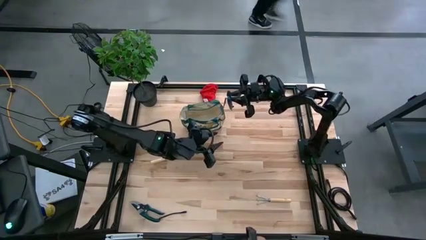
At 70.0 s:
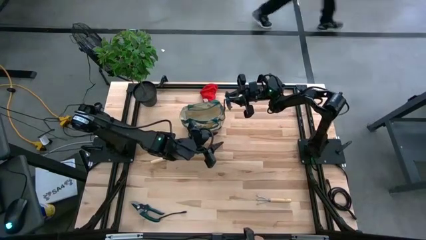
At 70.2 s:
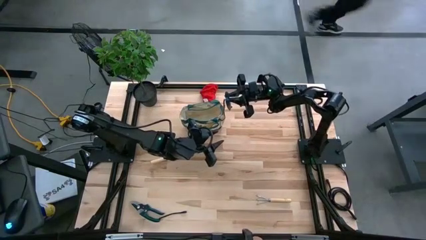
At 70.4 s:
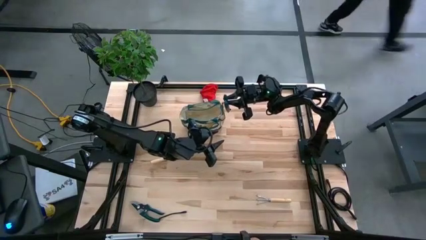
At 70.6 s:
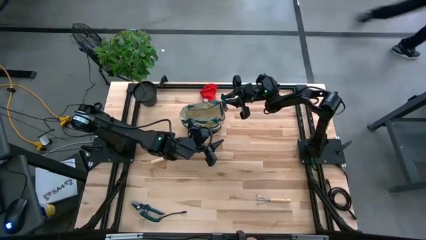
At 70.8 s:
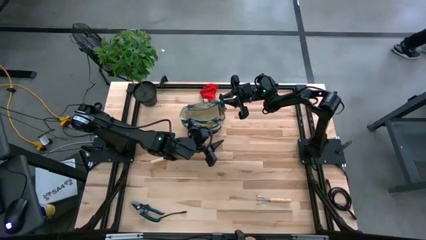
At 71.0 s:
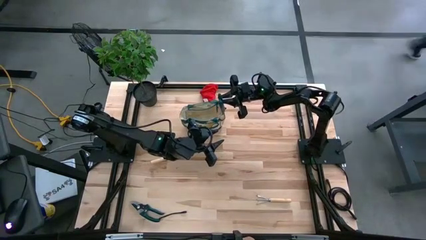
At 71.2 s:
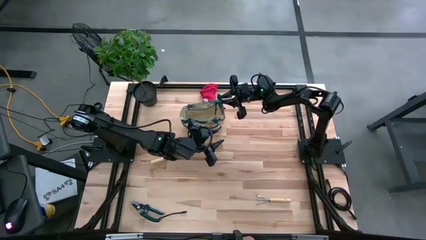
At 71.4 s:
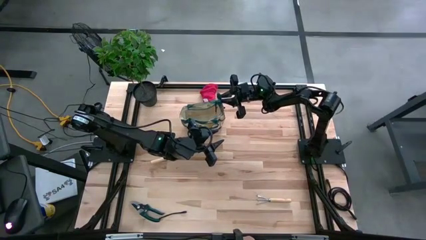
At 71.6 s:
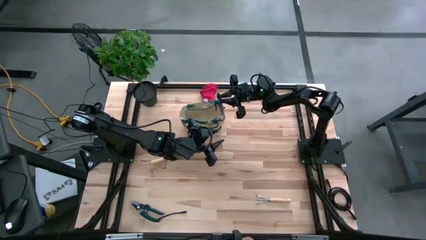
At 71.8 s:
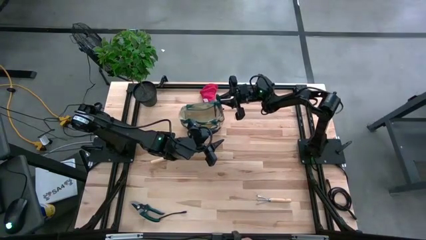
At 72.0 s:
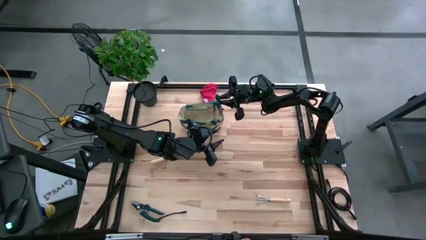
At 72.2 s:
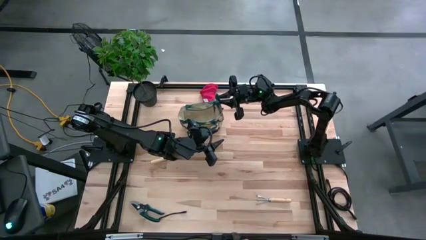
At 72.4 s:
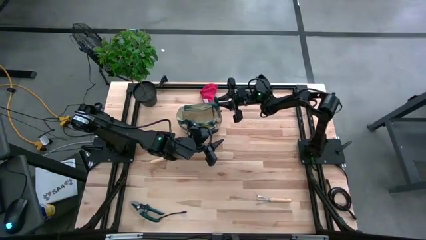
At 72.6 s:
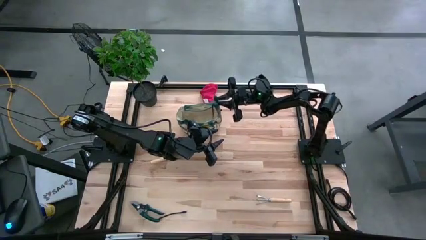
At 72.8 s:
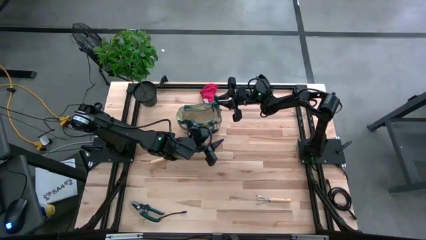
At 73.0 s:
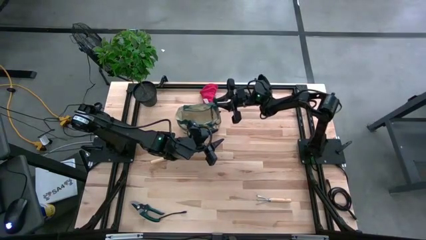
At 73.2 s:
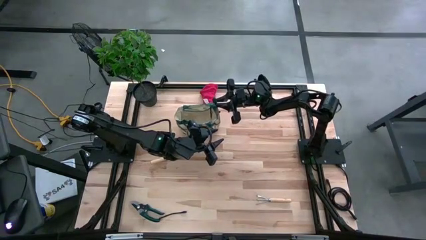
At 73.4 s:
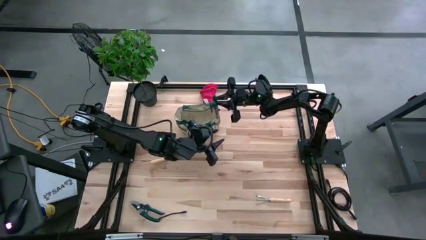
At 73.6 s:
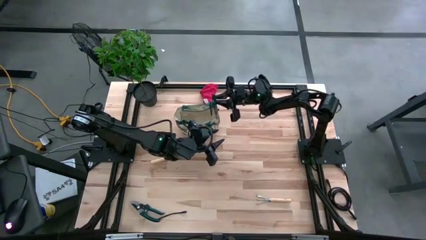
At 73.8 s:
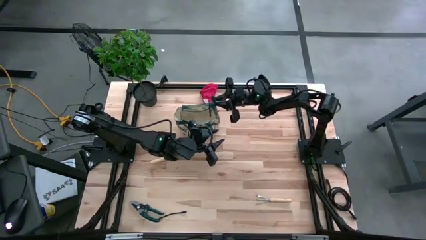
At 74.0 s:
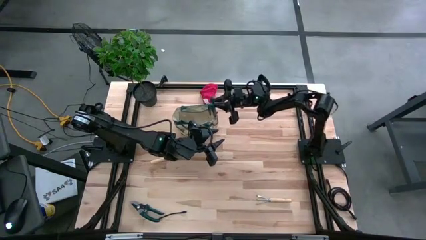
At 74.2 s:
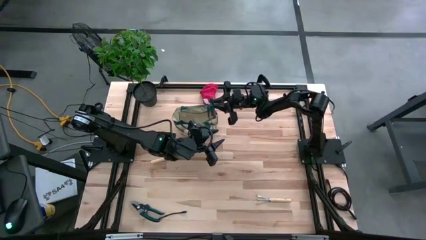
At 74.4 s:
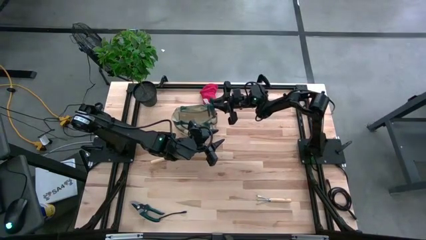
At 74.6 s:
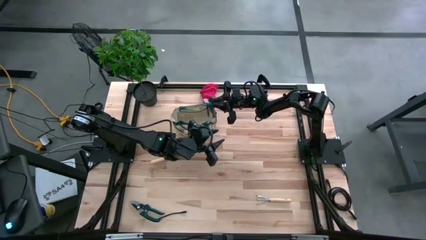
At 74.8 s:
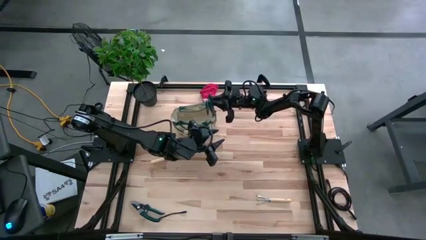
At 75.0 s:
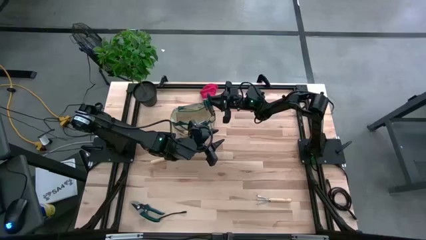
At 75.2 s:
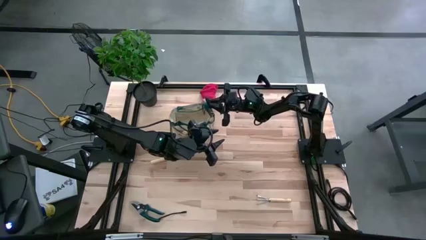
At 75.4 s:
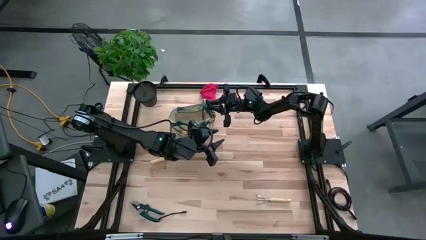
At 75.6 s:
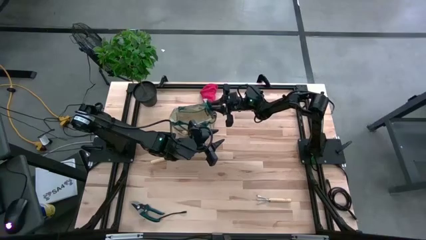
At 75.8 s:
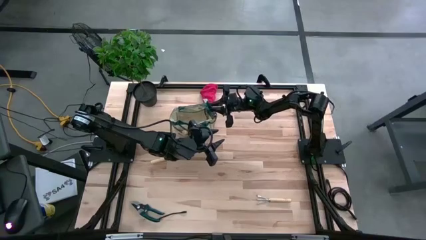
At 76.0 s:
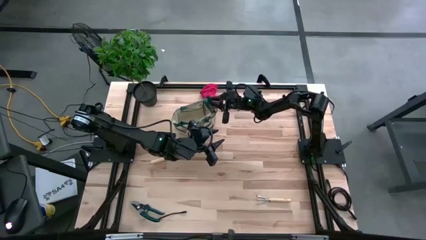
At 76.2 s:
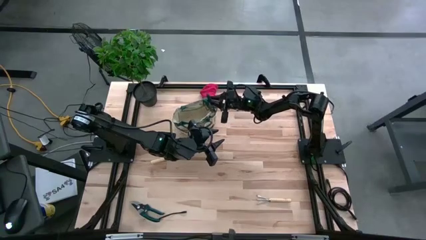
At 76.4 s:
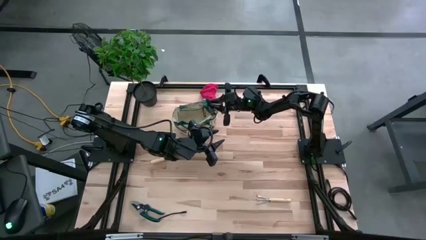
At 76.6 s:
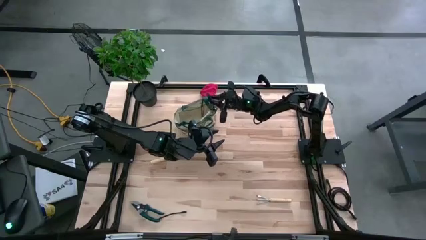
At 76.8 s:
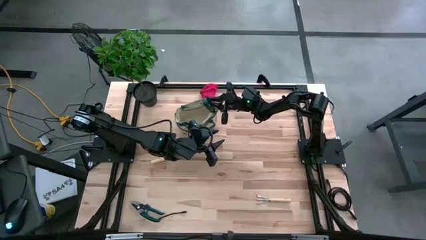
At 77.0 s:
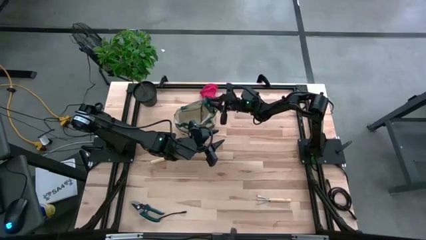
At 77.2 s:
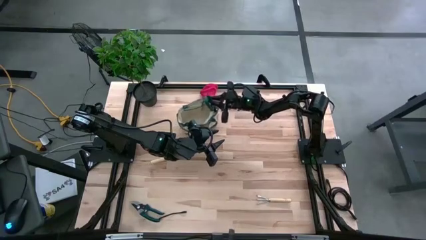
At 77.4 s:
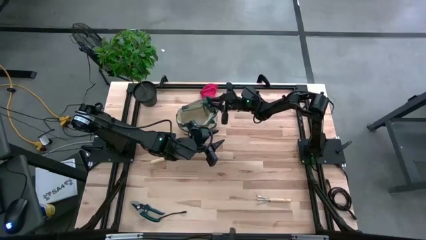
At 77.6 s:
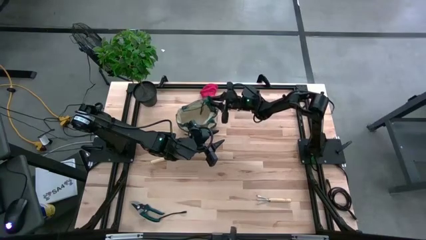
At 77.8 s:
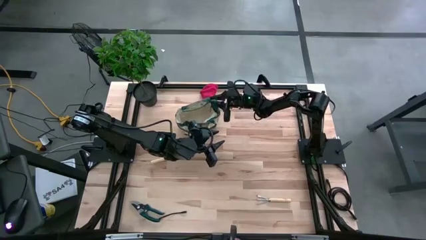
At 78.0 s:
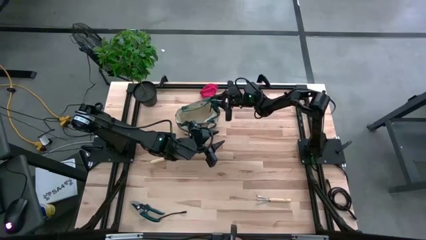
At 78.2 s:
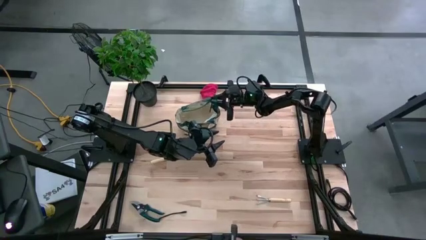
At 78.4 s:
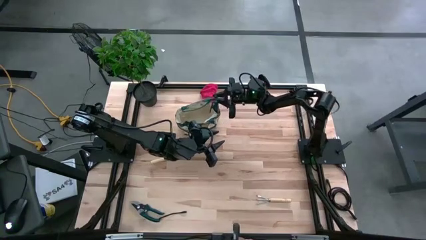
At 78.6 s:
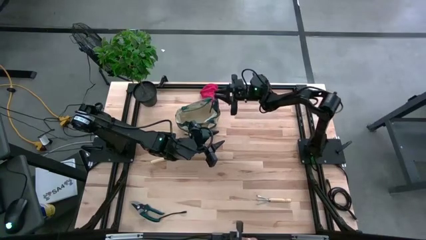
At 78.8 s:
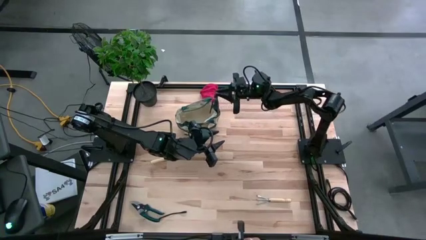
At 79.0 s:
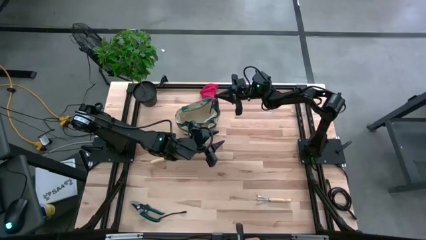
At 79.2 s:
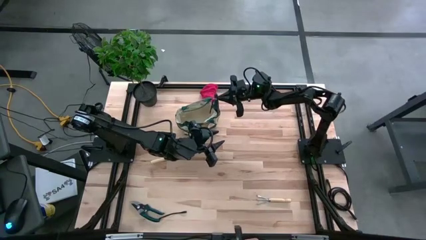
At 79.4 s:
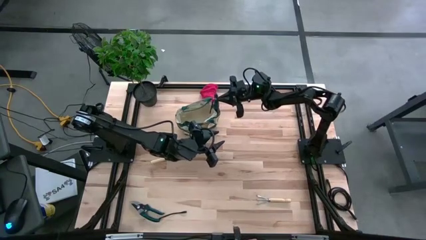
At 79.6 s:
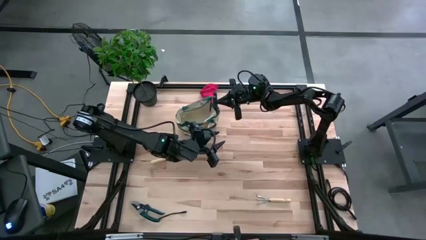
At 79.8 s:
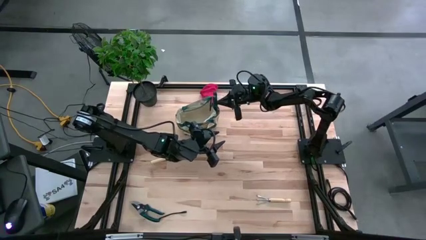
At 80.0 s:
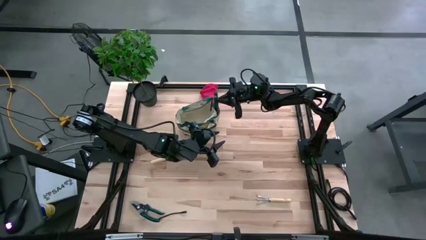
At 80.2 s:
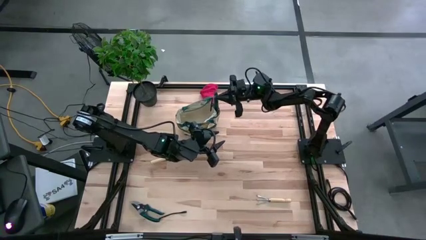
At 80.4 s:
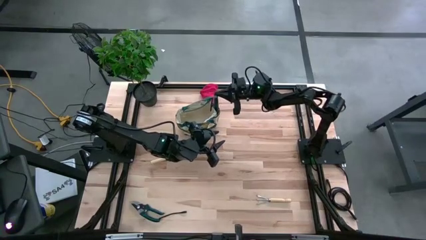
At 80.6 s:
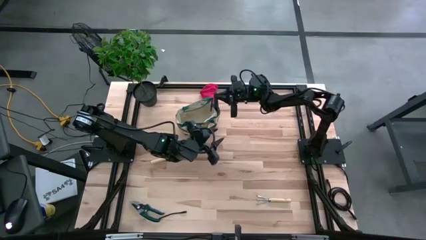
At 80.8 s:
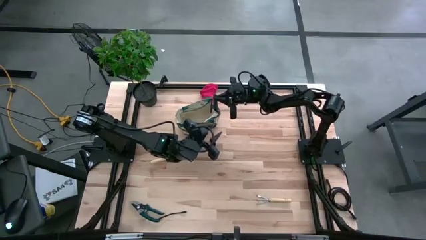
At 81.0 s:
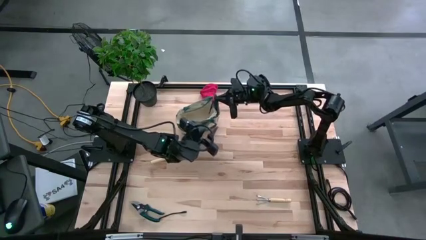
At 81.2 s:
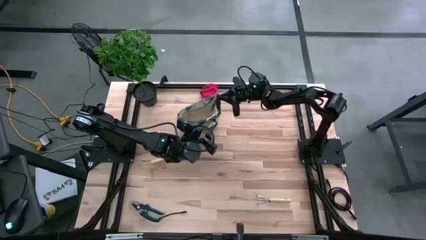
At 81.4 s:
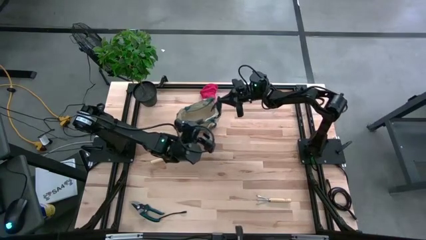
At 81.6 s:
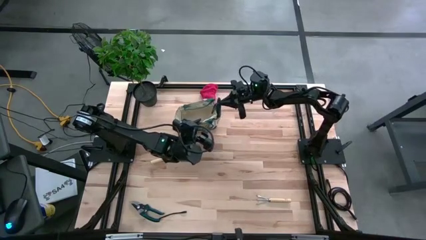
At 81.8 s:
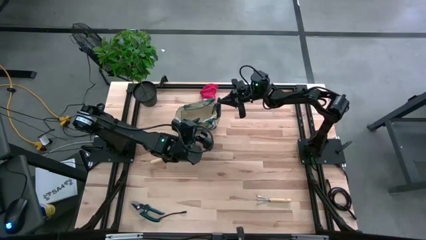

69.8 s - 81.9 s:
Task: Pick & Place Garden tools in Gardening bag
Put the top black shear scissor into the gardening bag

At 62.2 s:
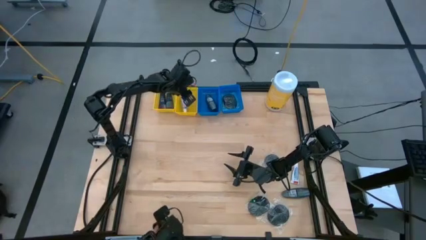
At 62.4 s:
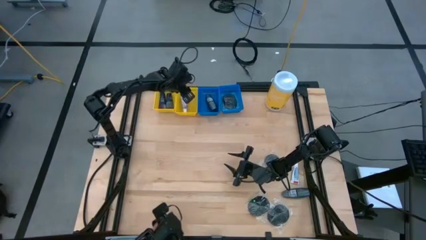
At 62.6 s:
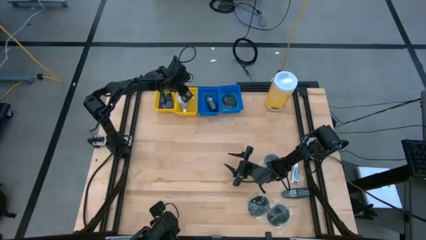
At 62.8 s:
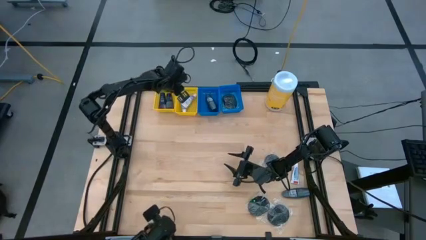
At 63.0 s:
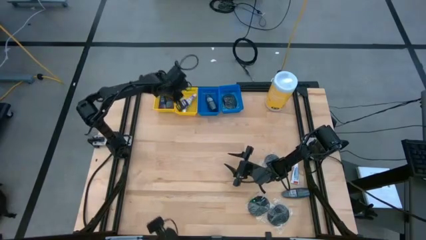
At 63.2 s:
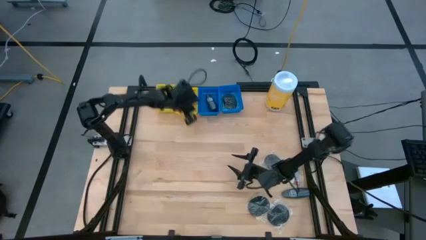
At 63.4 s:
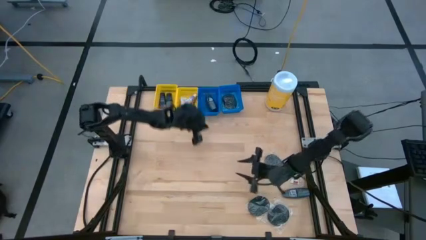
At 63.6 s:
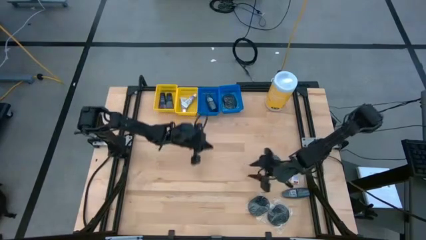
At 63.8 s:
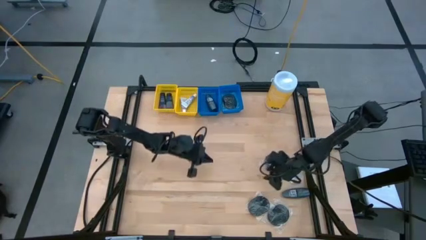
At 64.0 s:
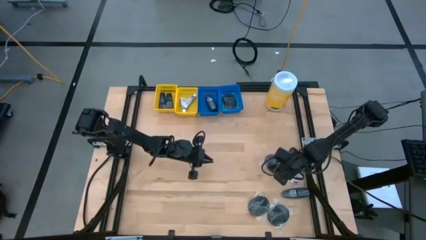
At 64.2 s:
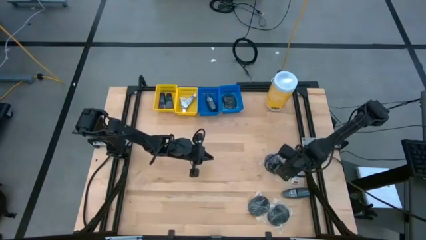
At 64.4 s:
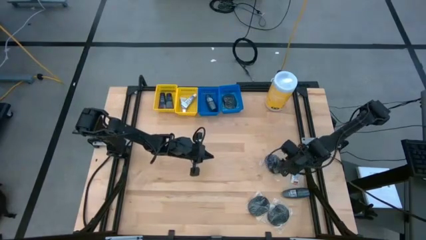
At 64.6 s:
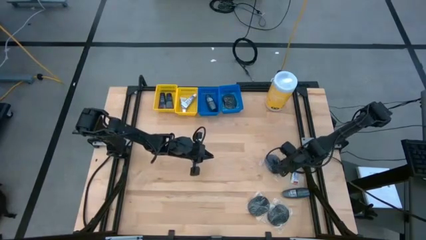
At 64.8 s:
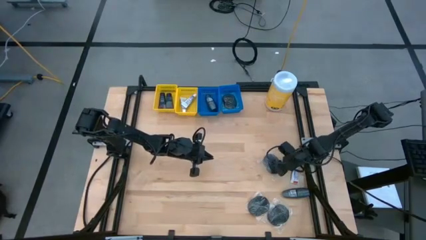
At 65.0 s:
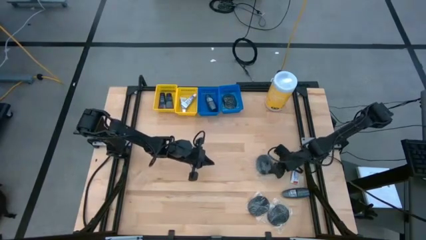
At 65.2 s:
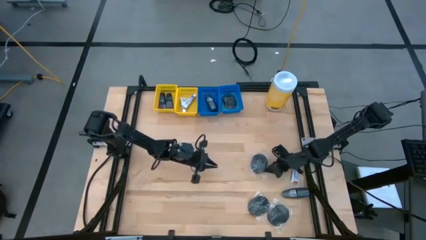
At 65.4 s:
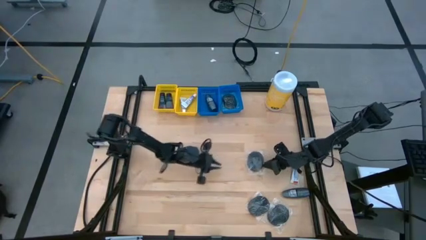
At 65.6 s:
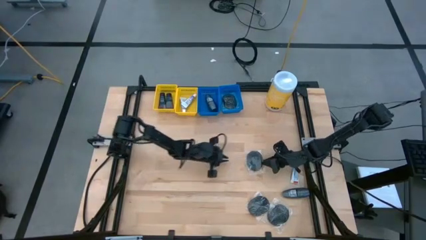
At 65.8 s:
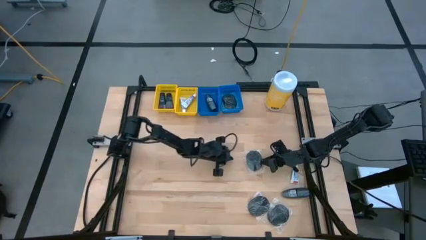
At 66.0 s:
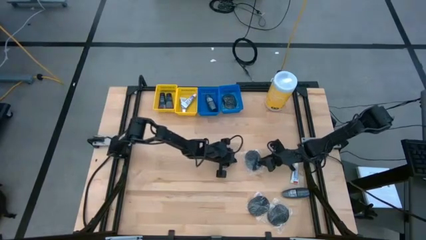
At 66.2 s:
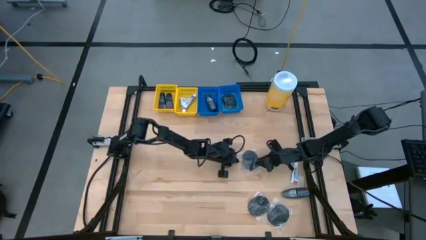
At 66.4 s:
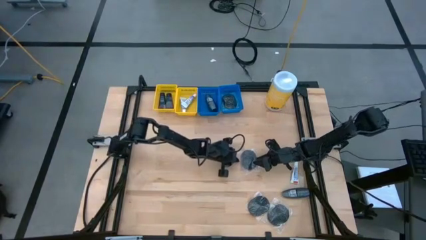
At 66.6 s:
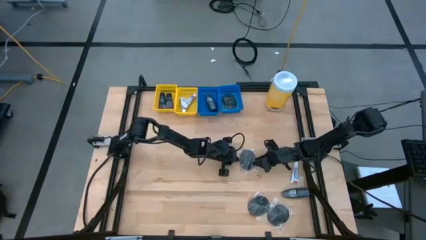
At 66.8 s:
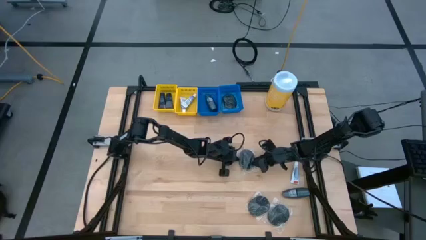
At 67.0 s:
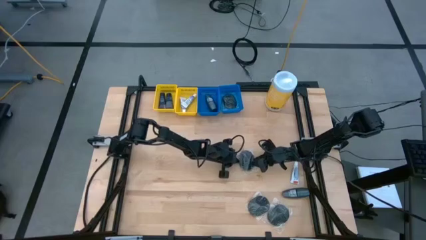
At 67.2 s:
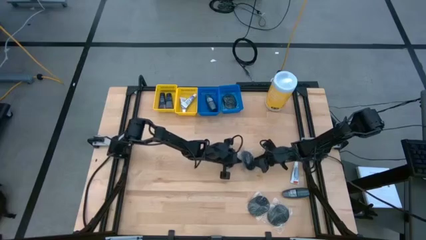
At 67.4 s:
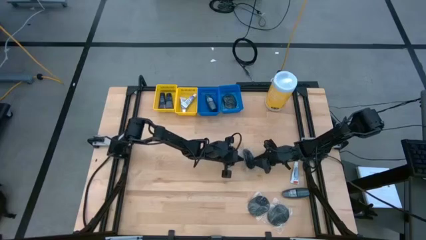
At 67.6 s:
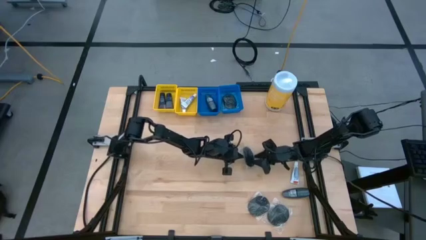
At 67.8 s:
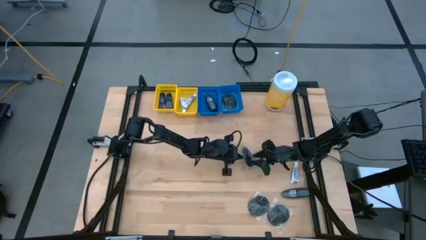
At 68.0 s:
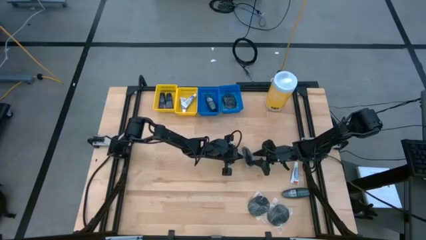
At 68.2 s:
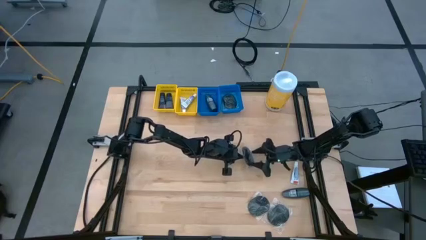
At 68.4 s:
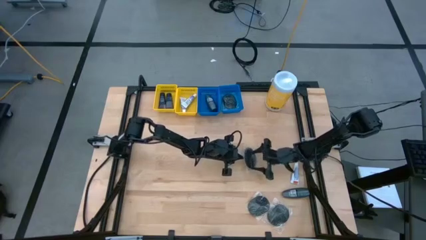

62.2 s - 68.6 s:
Task: Pick & Place Travel size toiletries
Put the black hairbrush into the right blue bin
